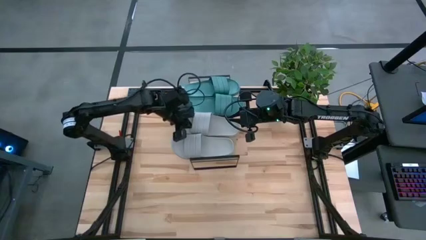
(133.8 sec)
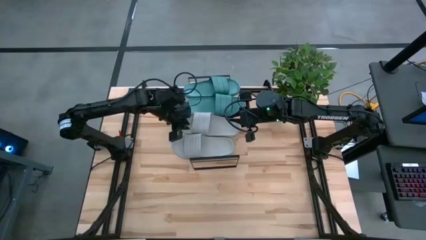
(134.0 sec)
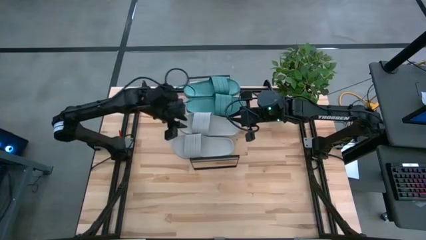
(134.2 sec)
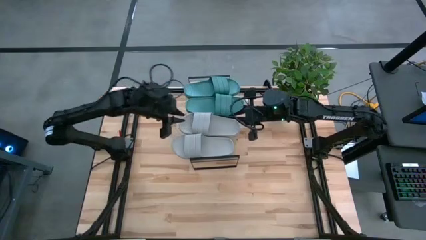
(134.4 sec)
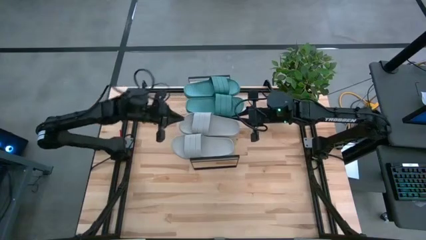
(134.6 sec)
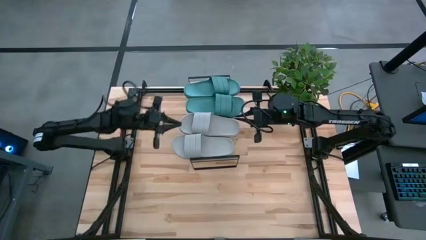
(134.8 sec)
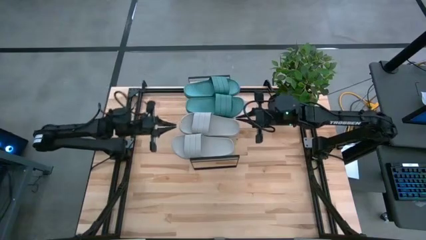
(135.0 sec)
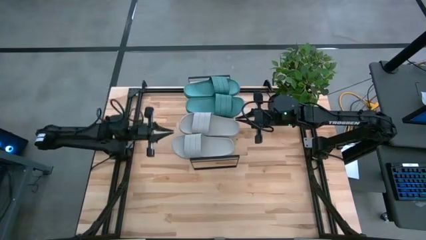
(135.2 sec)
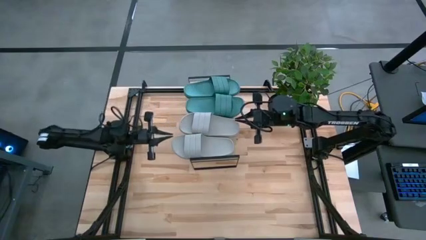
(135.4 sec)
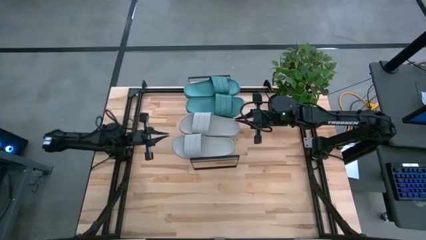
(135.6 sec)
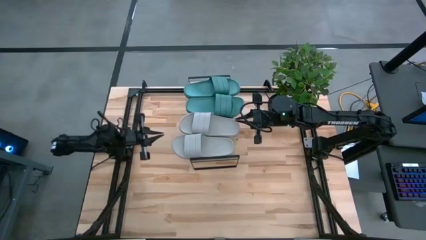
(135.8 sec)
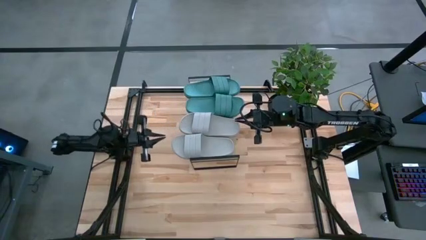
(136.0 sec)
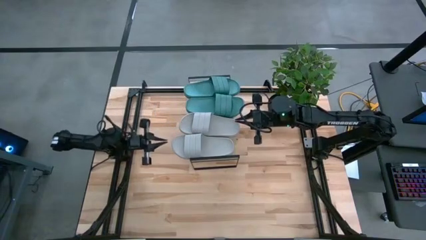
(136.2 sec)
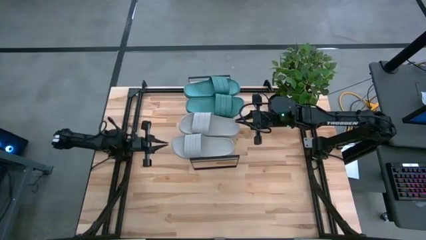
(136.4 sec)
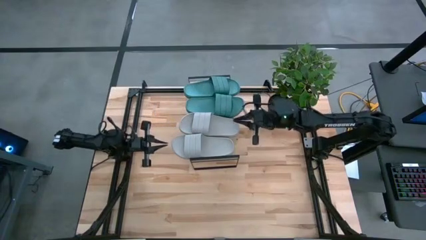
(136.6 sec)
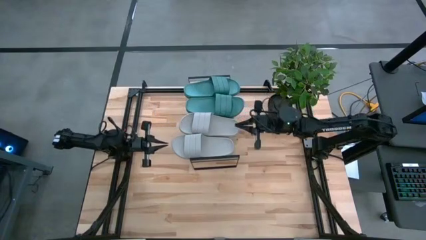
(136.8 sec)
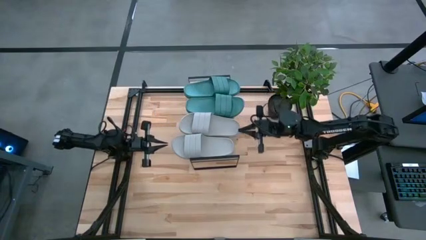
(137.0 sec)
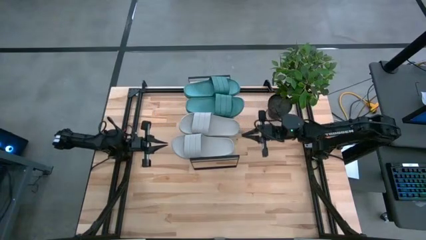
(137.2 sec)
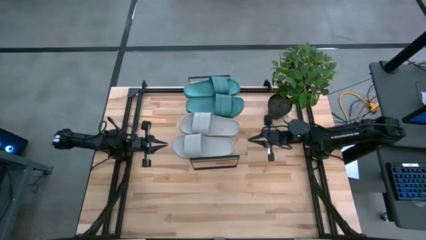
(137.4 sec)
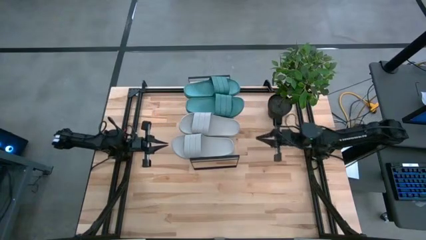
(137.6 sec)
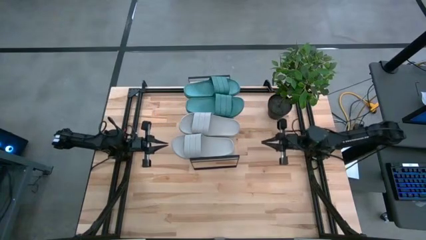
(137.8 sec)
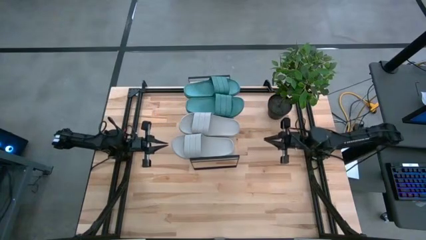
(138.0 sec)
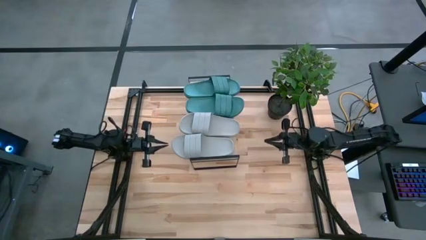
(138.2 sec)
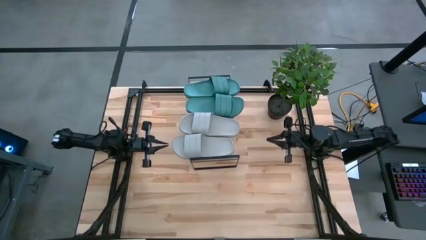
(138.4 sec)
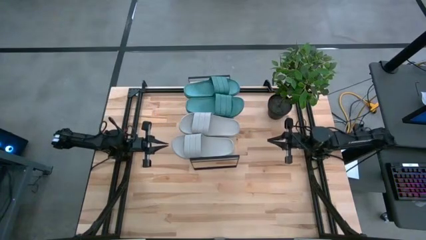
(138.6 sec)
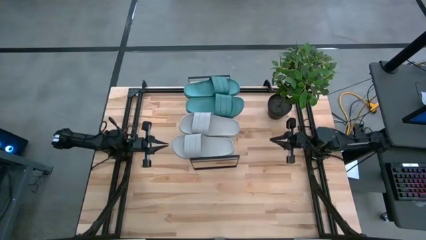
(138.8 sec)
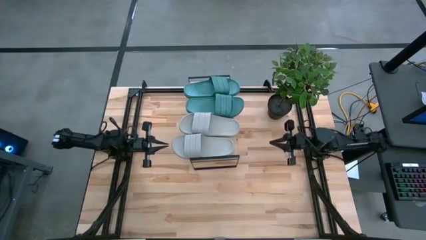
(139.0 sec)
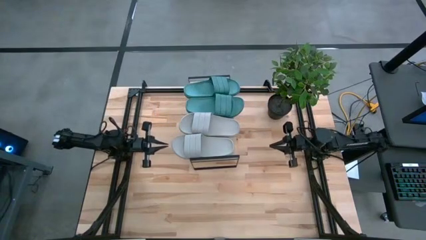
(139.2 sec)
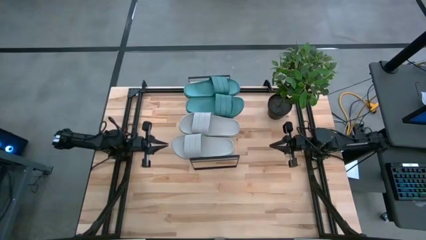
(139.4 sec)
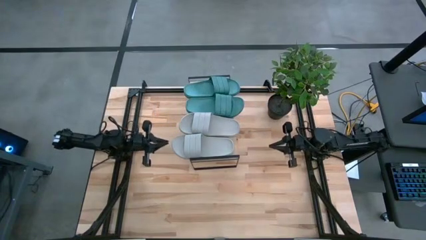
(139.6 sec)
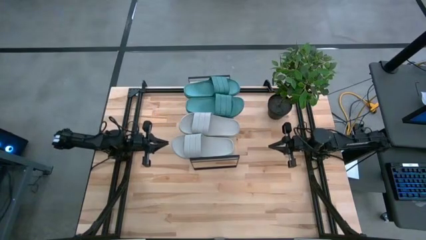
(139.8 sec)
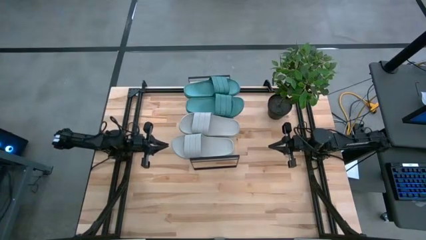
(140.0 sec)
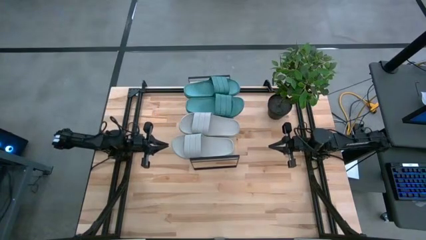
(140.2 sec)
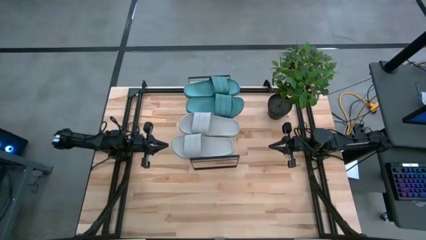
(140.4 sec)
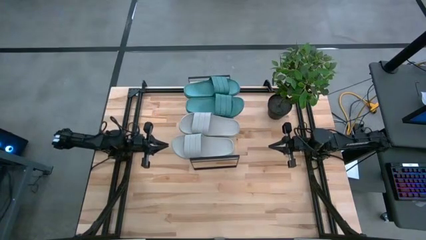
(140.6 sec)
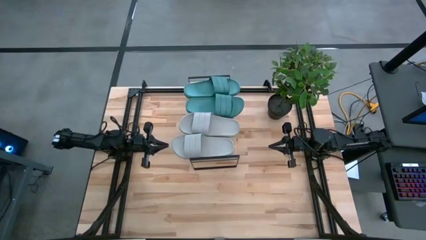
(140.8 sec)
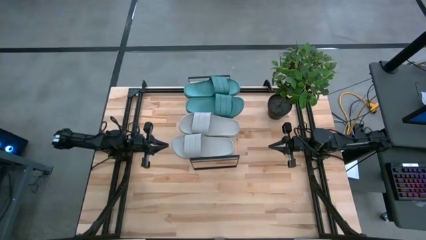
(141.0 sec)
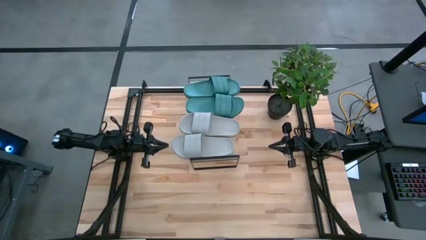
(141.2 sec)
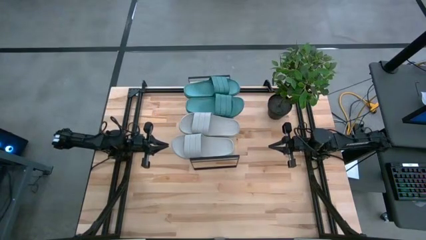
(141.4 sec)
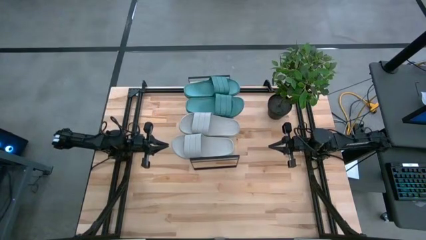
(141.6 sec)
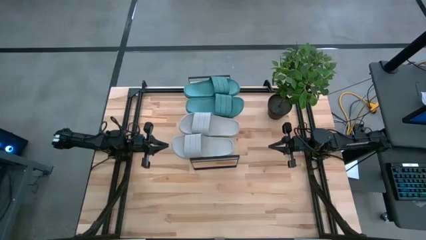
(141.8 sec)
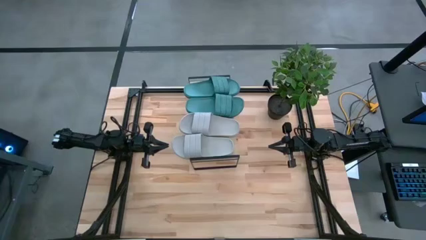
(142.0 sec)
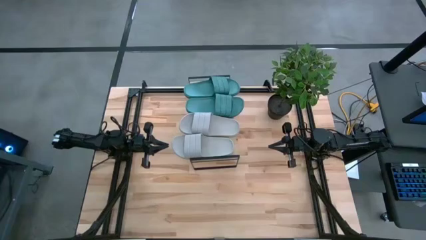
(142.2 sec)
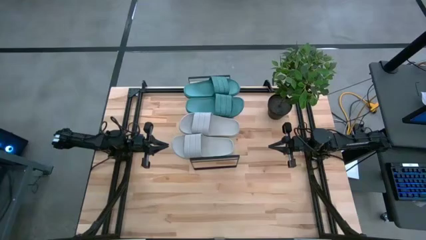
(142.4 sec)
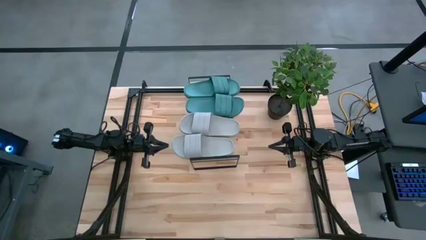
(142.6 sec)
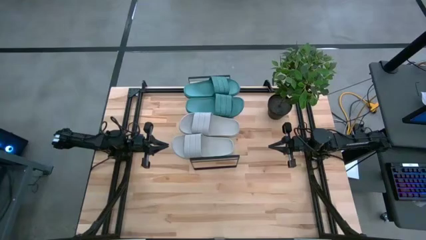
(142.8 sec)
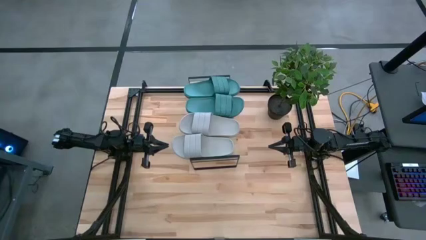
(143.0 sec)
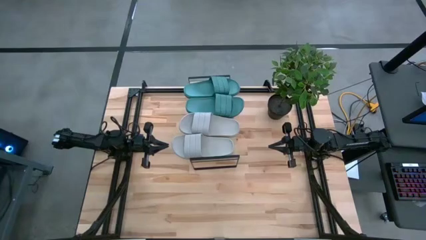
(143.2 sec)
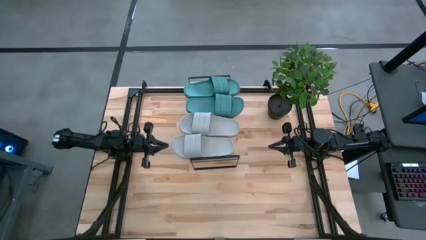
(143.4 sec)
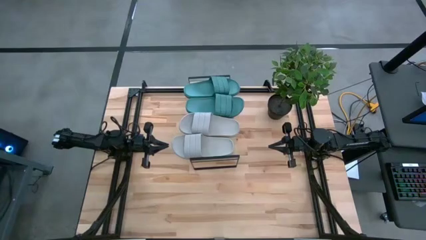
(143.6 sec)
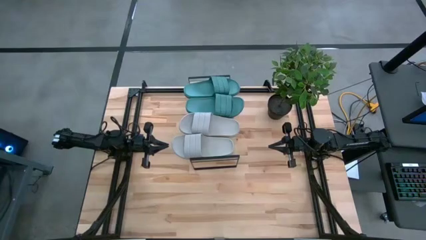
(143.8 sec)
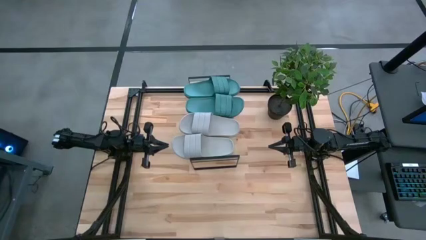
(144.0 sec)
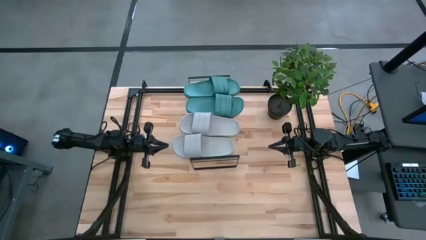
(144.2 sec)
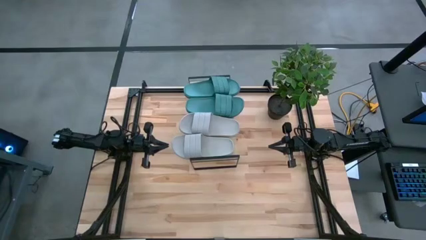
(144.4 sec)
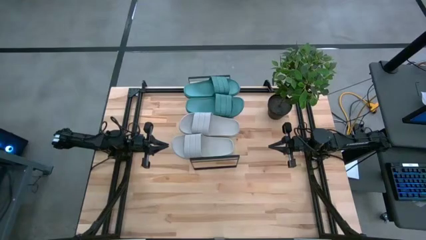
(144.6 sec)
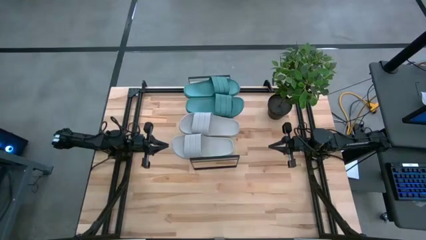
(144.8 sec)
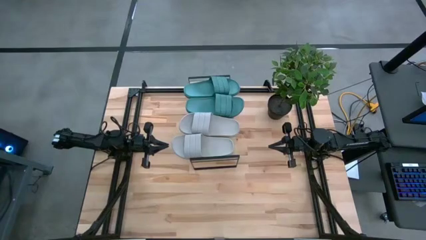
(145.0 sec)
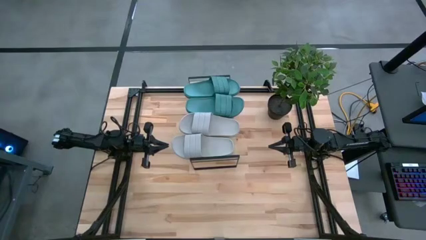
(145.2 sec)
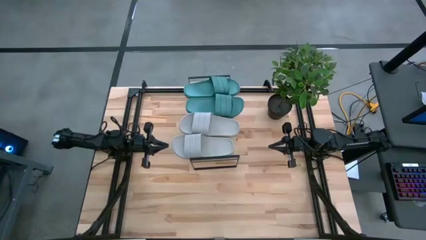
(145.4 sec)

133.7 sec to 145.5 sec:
Task: Pick and place slides into the shelf
Return to Home Position

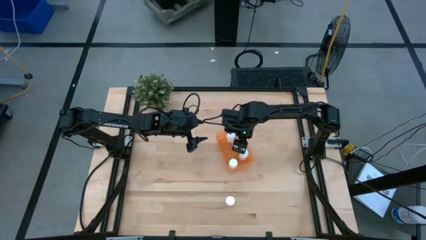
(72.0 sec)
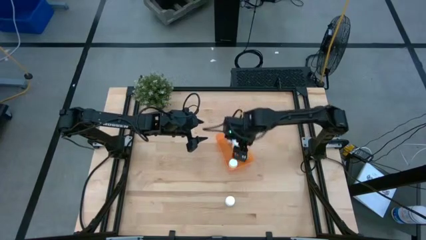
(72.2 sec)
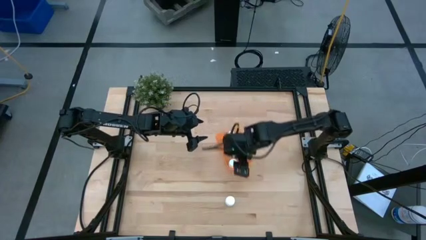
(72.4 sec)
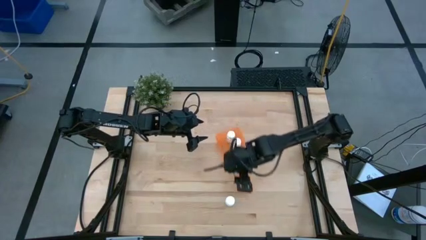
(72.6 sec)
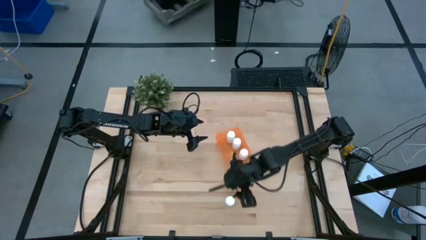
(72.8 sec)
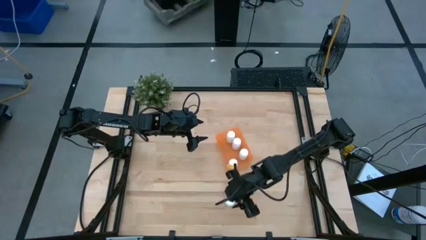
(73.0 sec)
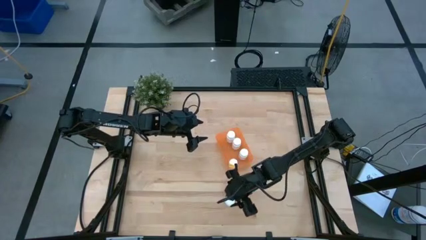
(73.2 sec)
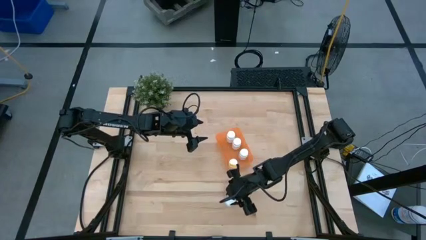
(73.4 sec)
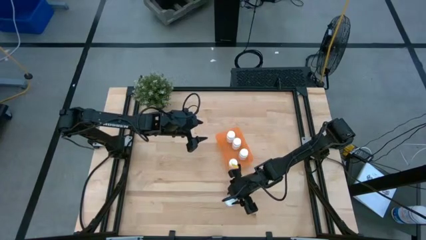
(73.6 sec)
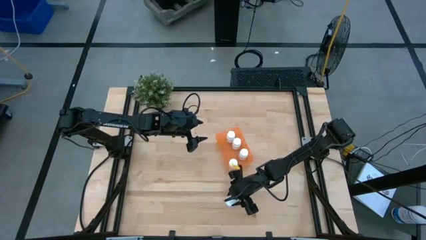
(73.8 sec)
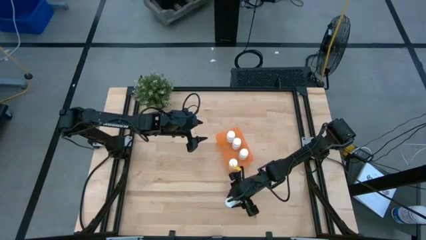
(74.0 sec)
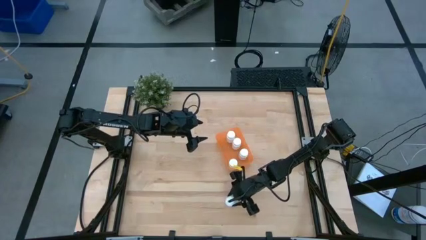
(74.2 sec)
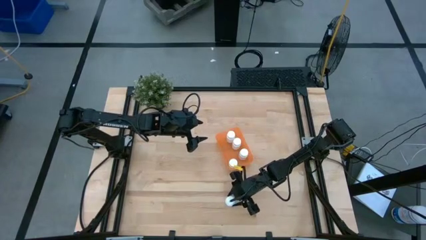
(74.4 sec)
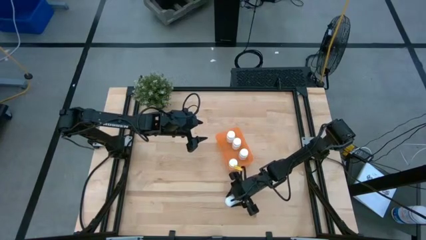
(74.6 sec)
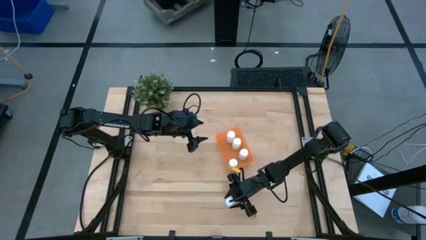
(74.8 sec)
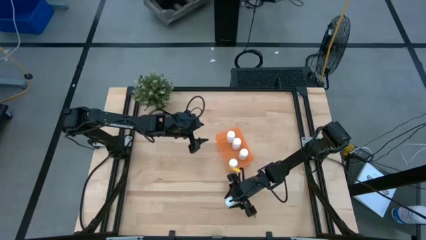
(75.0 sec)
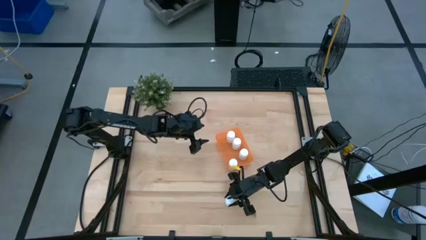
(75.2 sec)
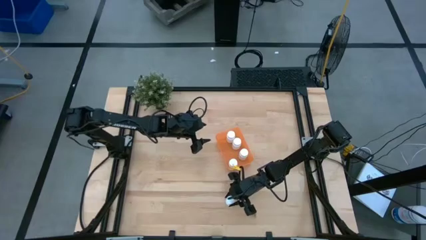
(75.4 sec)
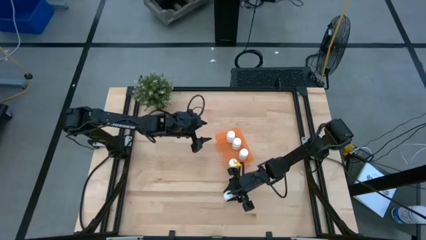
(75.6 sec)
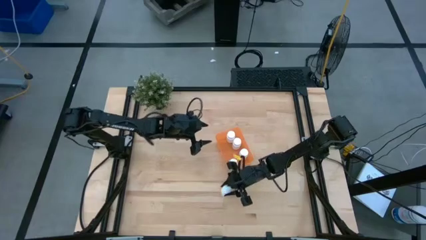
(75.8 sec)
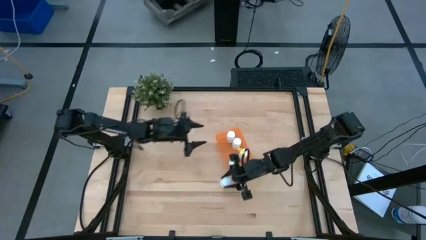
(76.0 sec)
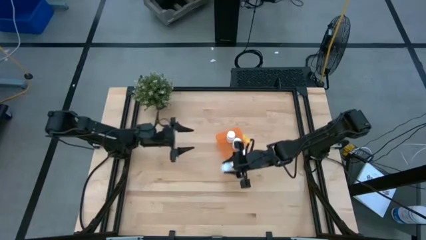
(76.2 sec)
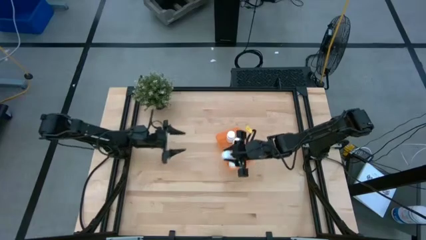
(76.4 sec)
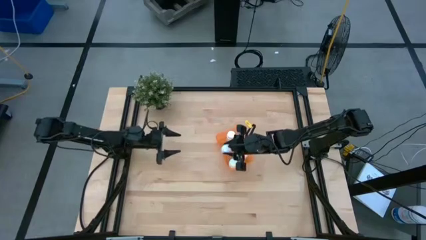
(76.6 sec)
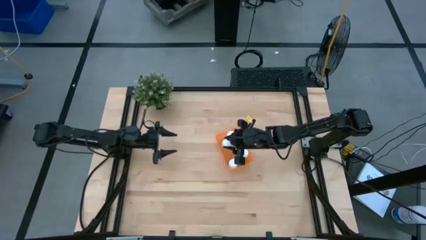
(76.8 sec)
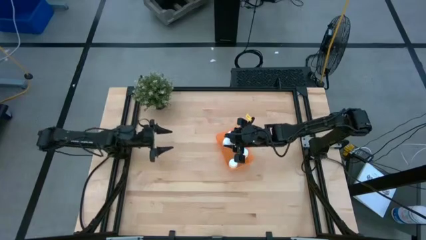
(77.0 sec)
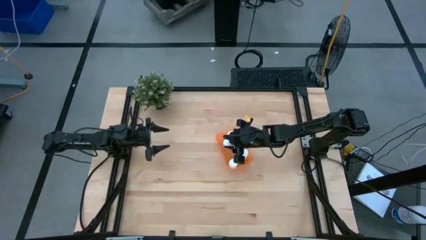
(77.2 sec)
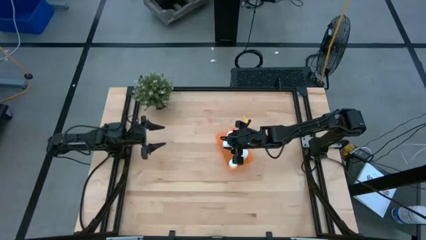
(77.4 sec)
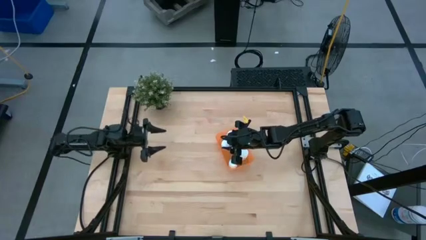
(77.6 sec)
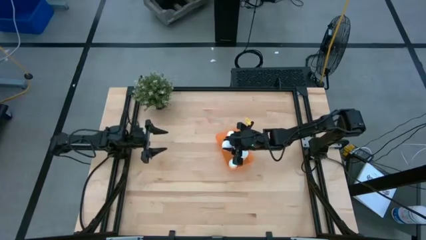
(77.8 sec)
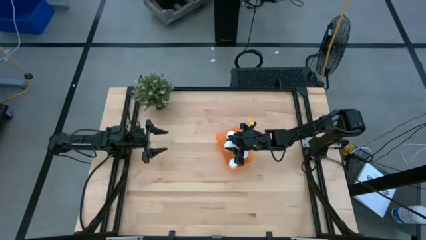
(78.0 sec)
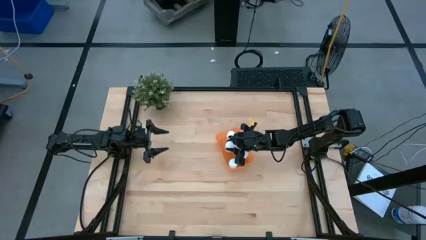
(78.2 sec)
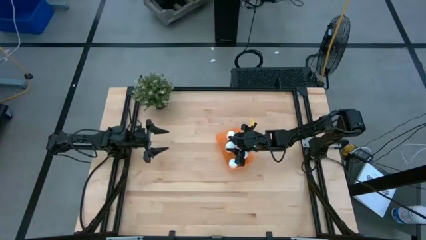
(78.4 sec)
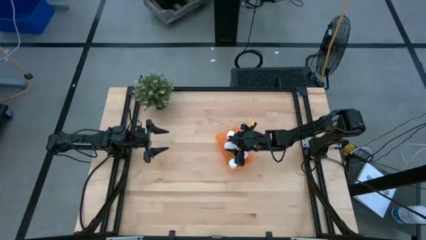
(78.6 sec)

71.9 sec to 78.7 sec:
Task: Pick and place pill bottles into a basket
Put the white medicine bottle into the orange bin
